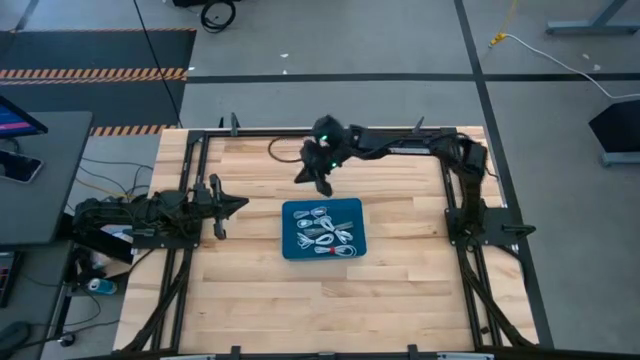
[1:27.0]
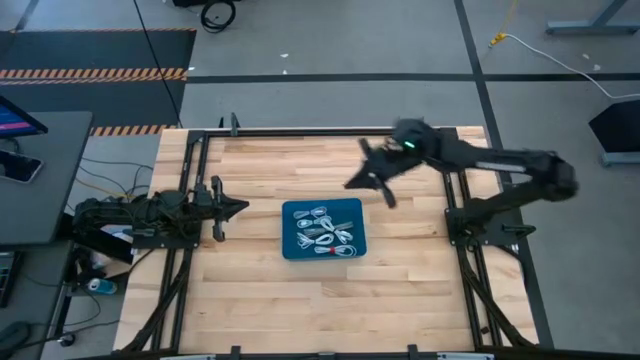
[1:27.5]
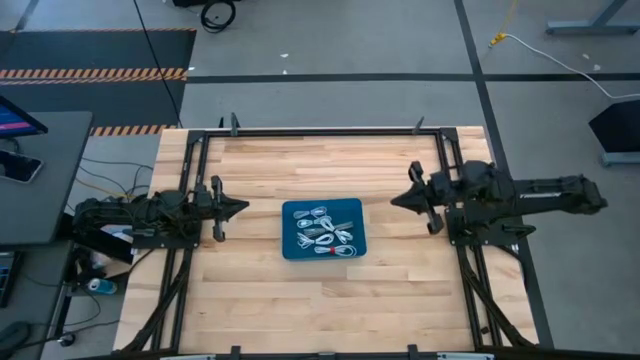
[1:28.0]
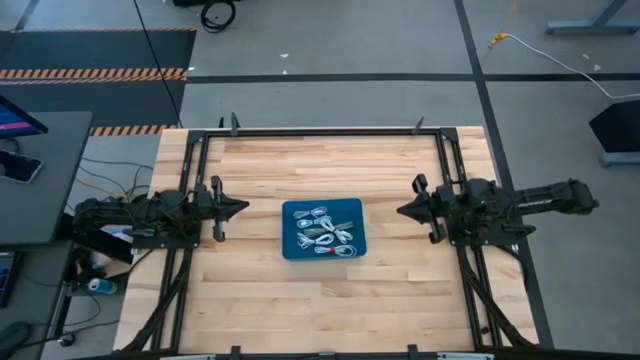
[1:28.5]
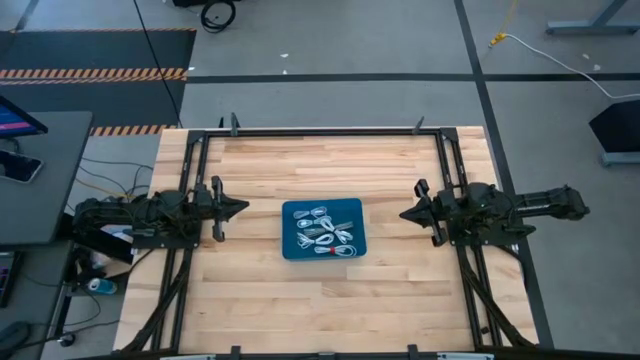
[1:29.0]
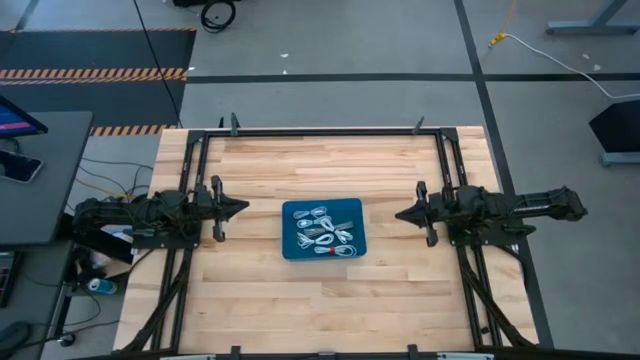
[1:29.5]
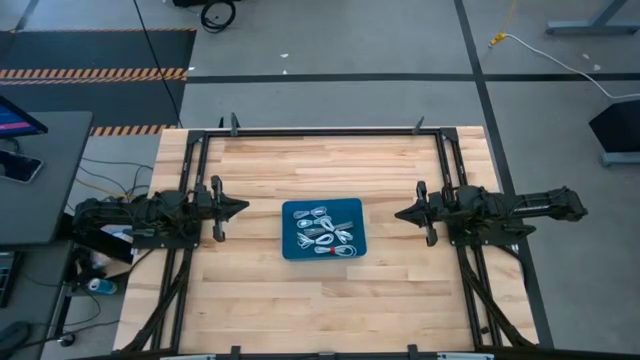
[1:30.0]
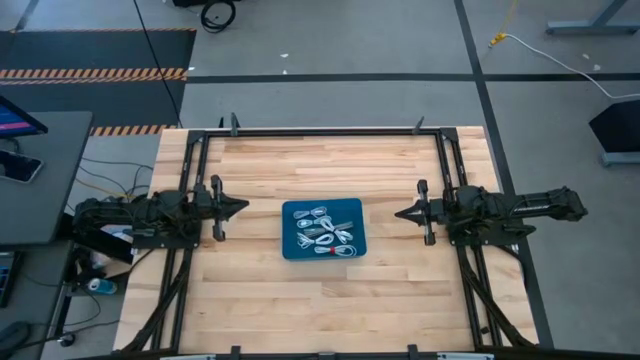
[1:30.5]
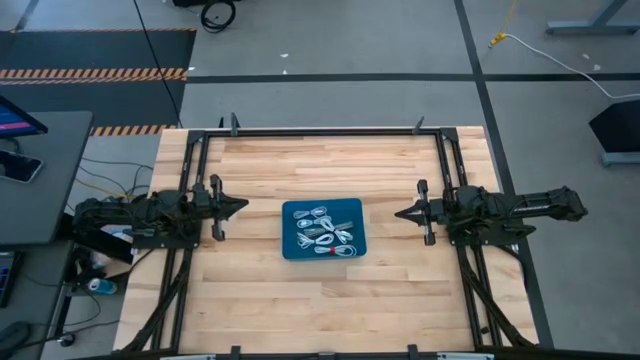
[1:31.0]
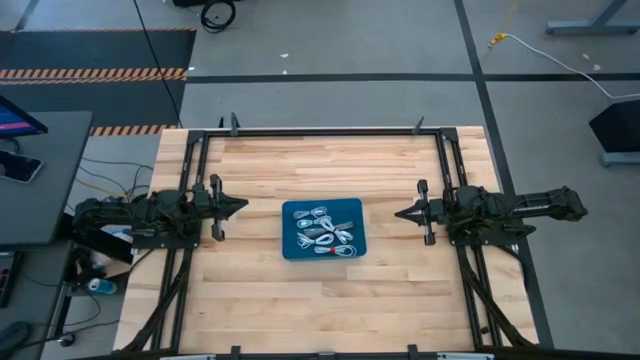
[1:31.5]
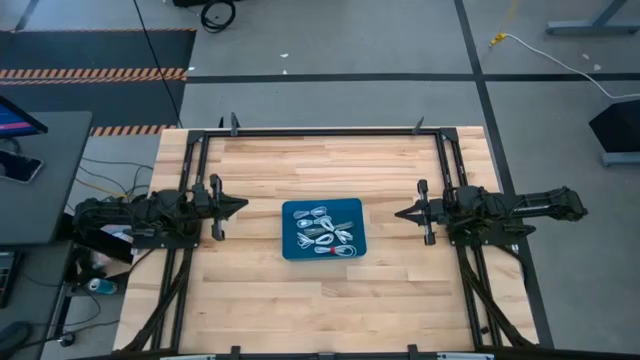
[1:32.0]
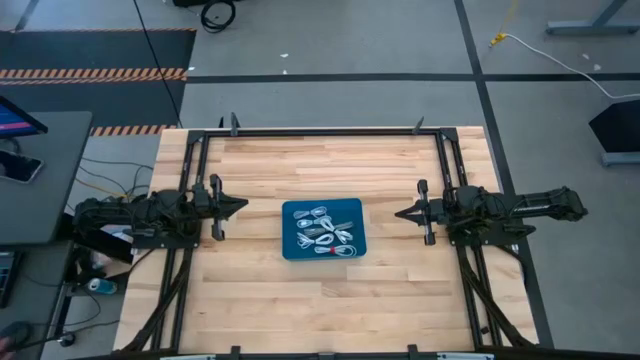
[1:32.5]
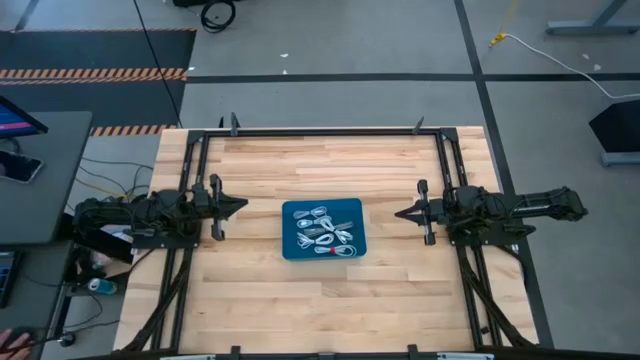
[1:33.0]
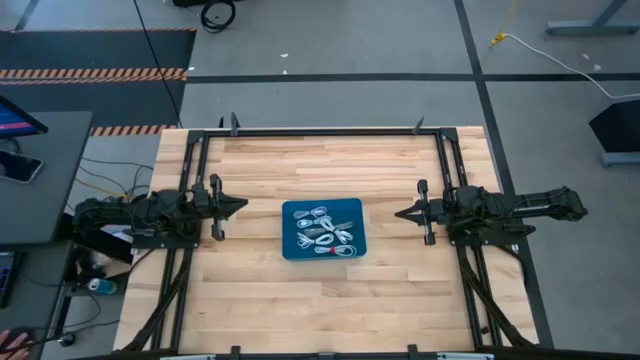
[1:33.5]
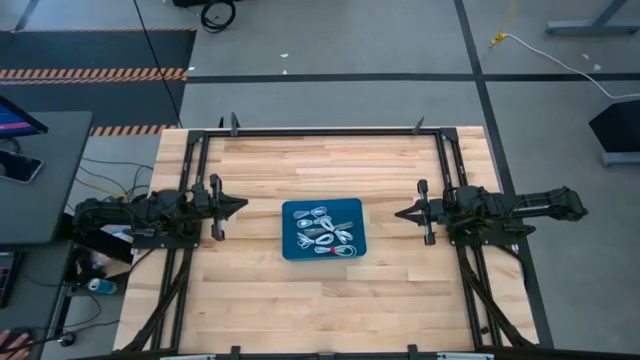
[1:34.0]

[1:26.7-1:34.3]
Task: Pick and place USB-C Cables
Return to Home Position

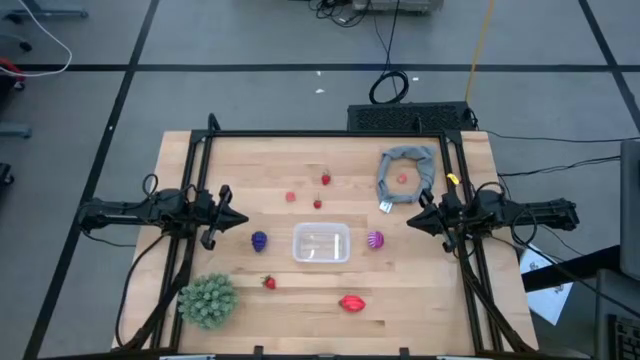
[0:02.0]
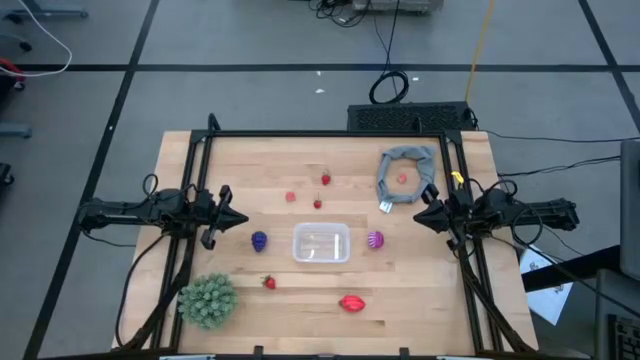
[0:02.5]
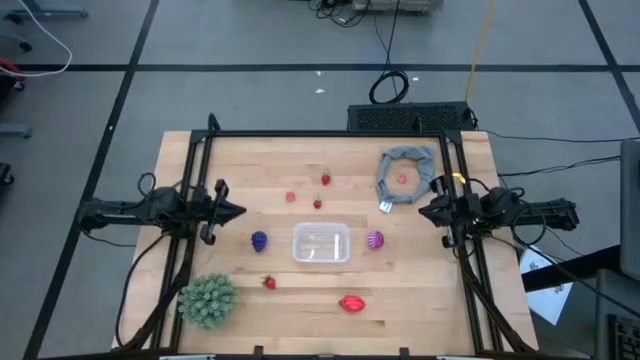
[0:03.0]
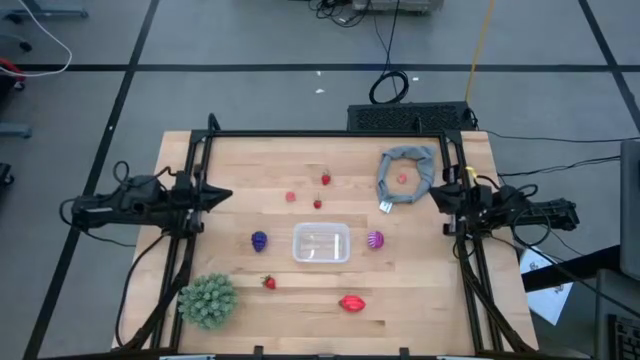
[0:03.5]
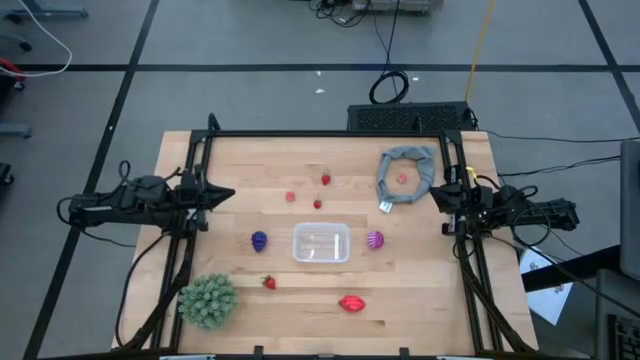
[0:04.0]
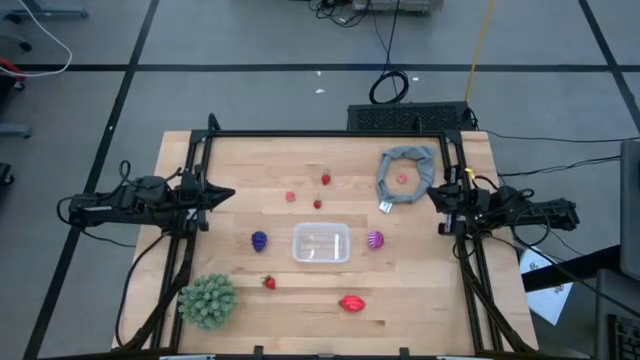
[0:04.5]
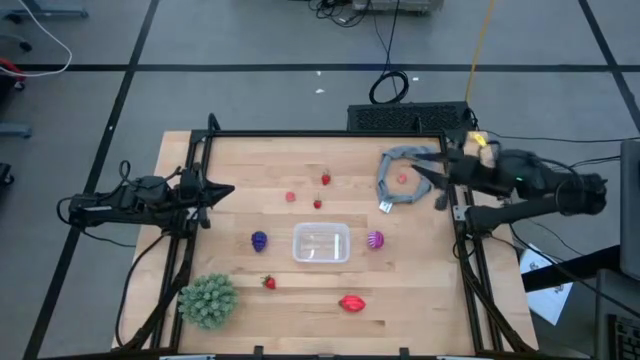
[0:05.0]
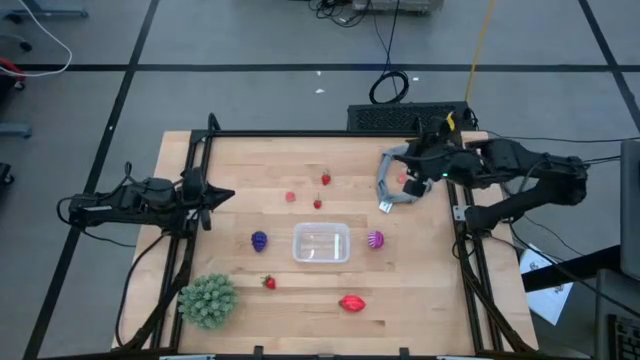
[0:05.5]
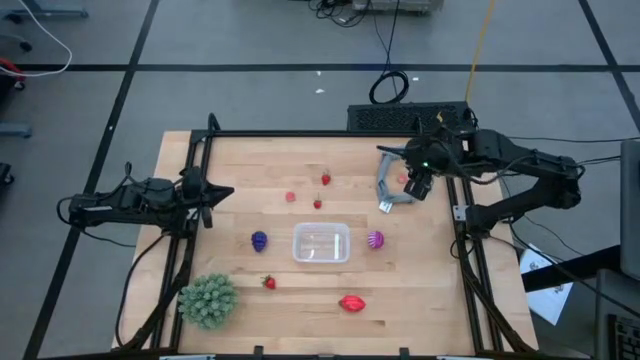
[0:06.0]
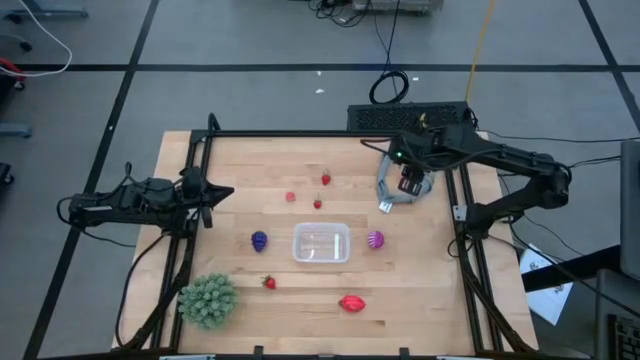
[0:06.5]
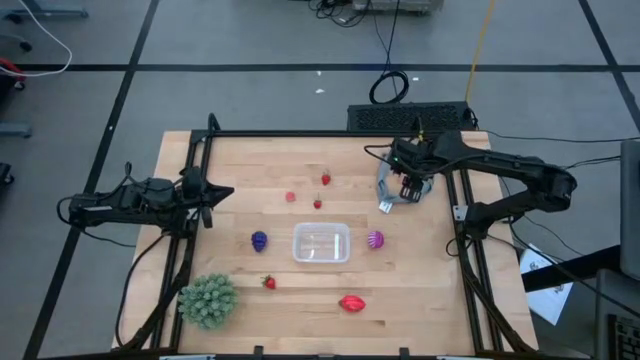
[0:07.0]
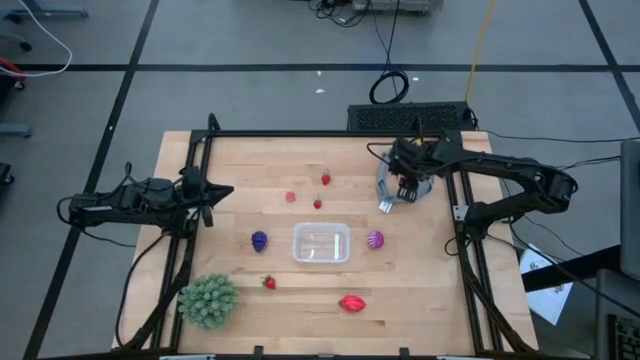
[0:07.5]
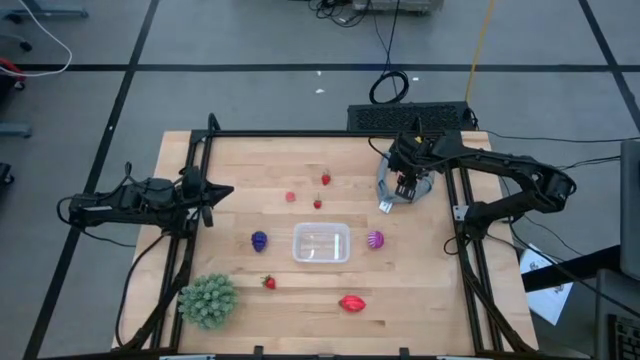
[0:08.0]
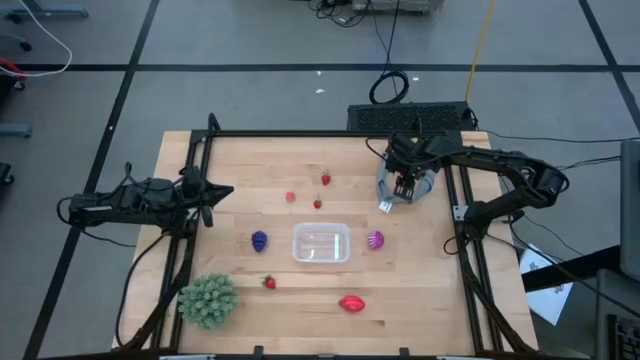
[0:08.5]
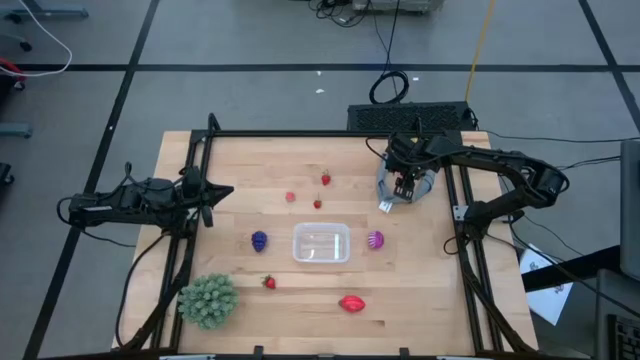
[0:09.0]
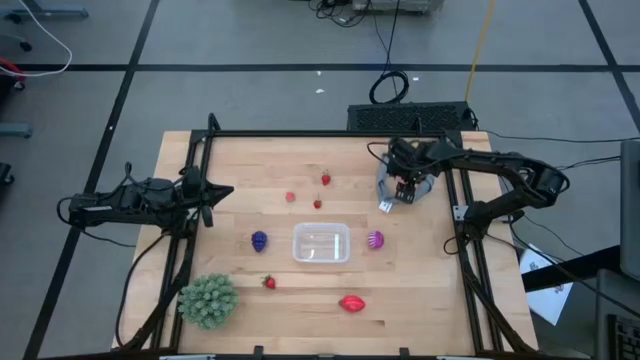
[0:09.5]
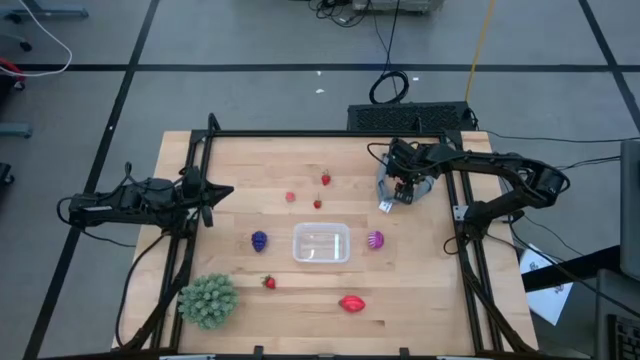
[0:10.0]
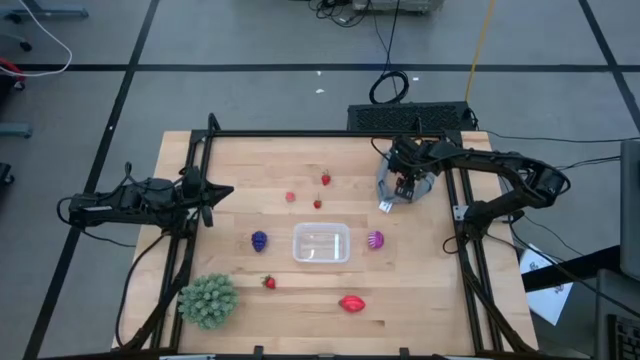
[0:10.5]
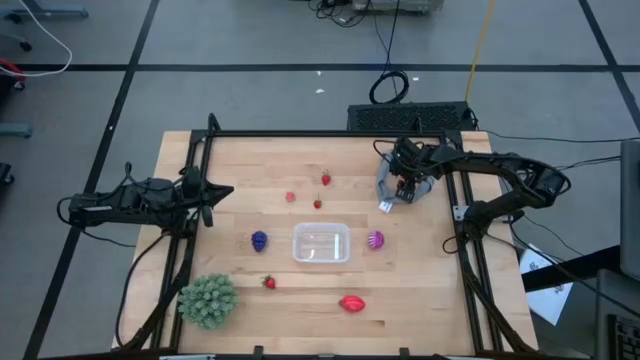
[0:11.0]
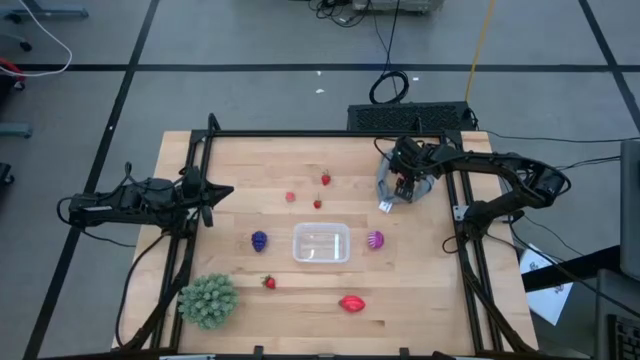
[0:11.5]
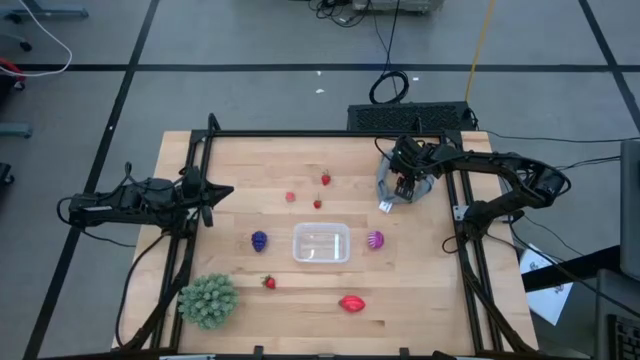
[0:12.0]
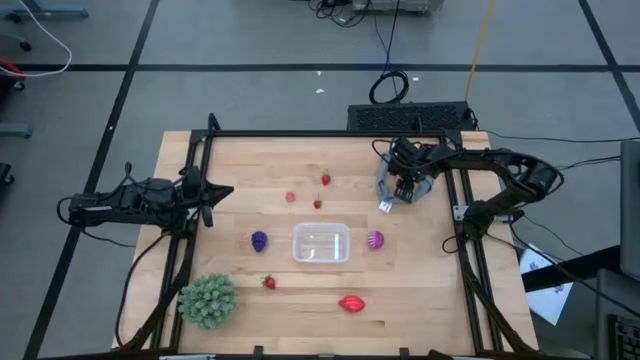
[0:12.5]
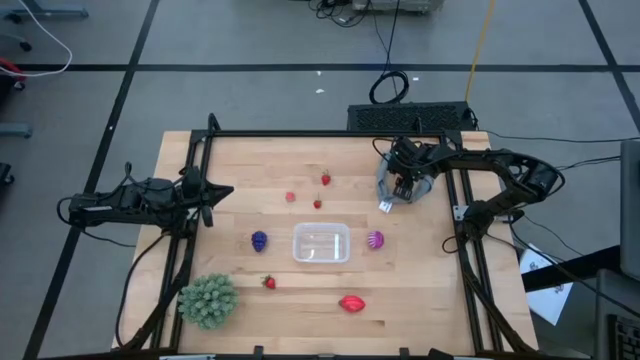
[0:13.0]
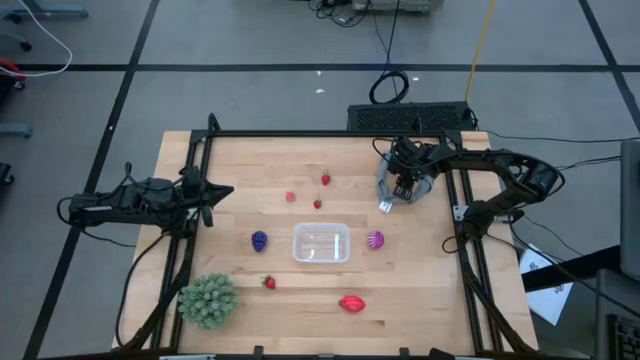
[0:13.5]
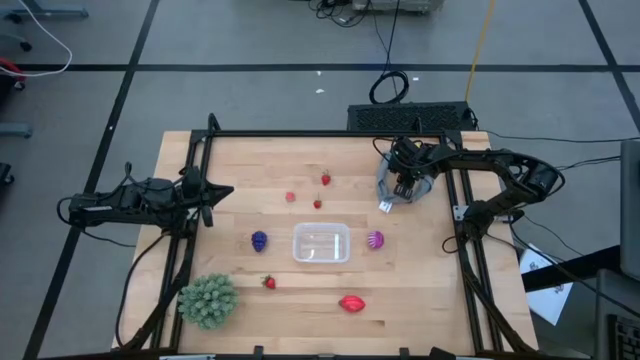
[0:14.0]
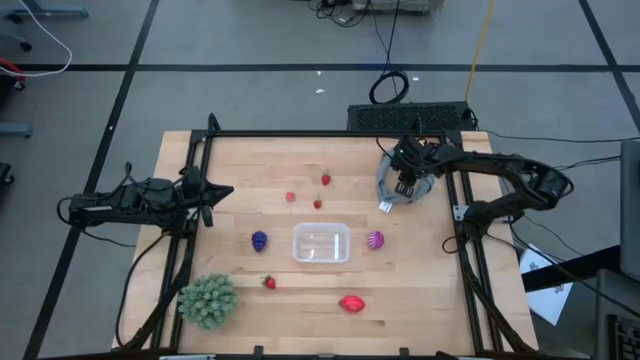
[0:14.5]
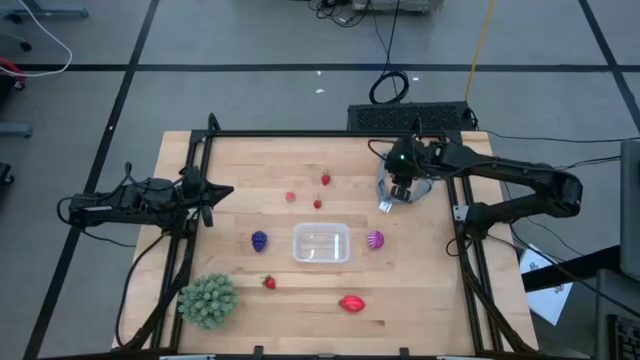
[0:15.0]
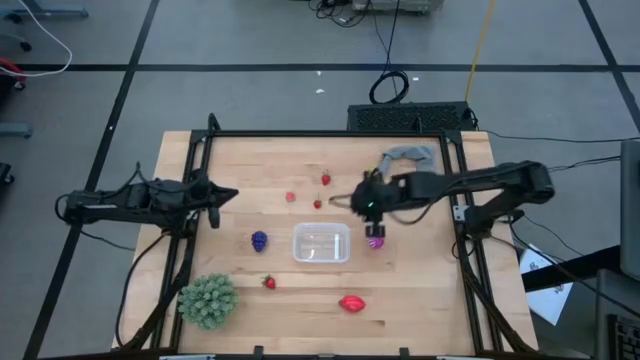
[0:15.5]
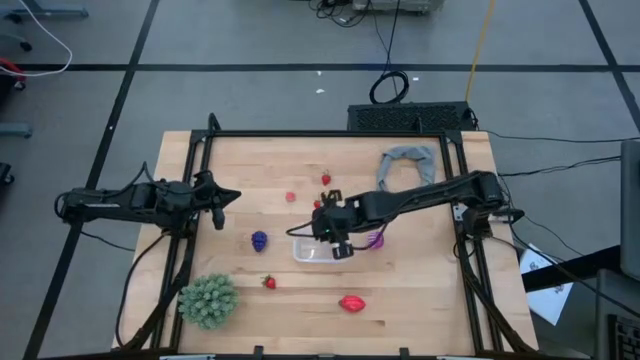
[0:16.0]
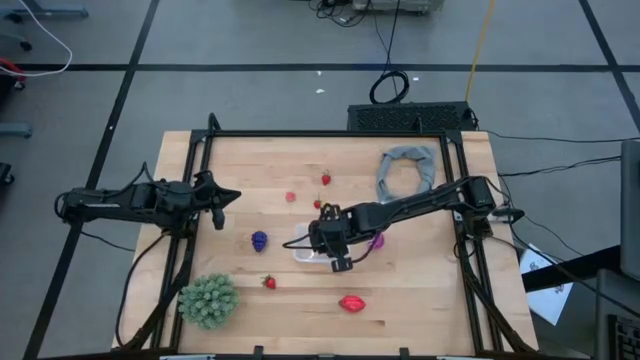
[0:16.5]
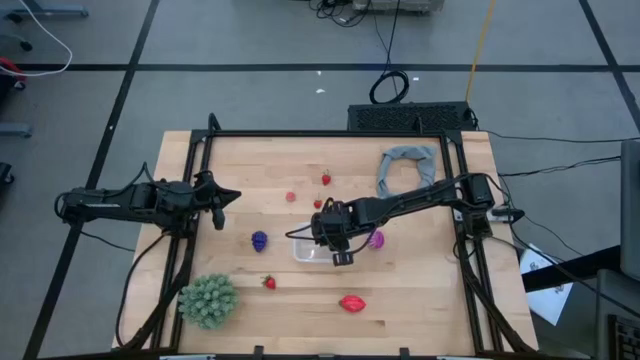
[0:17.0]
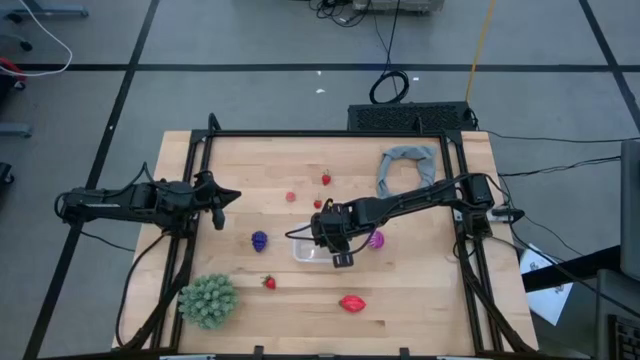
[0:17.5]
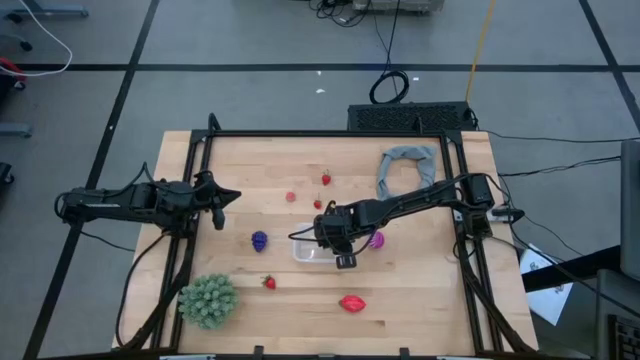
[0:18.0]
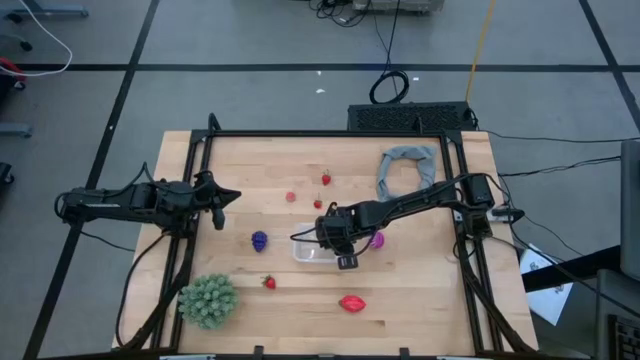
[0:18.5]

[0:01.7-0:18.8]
Task: Pick and placing Produce into tupperware
Put the right peach into the bin
